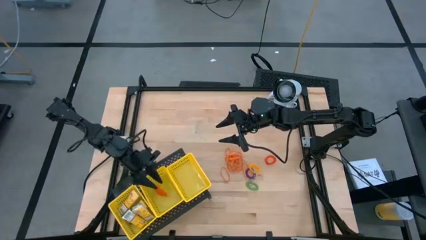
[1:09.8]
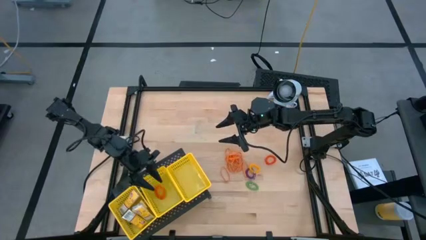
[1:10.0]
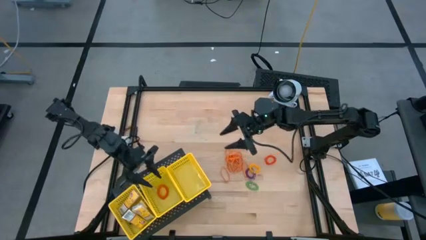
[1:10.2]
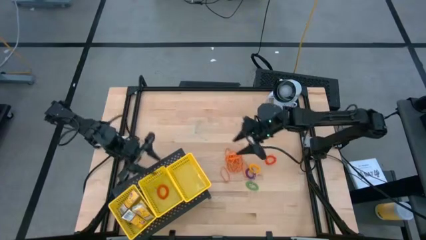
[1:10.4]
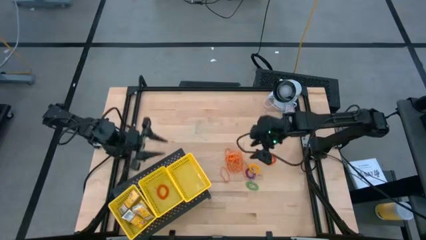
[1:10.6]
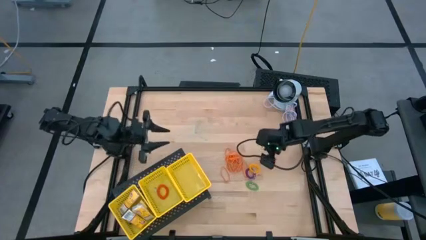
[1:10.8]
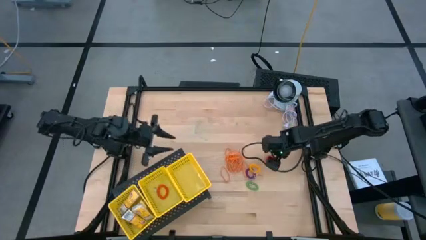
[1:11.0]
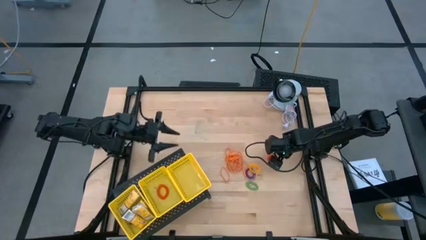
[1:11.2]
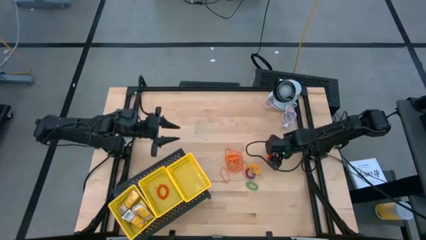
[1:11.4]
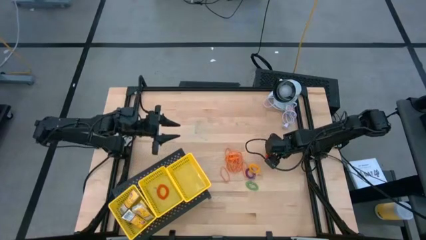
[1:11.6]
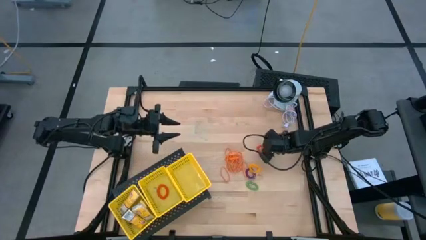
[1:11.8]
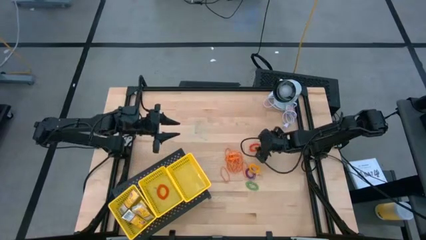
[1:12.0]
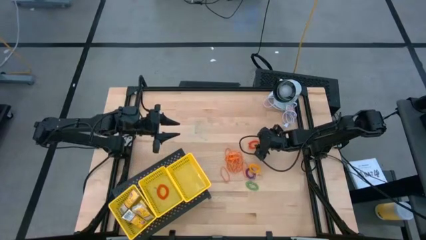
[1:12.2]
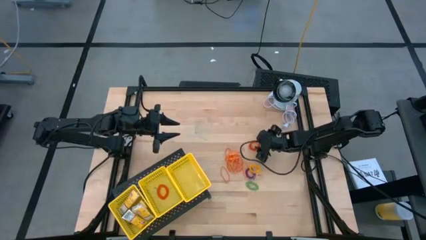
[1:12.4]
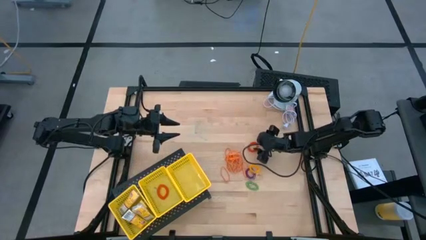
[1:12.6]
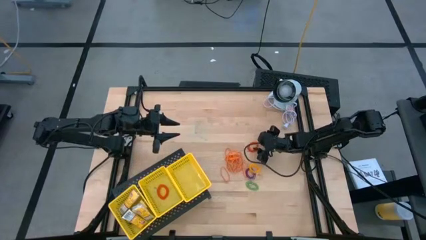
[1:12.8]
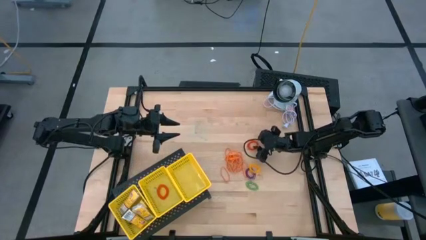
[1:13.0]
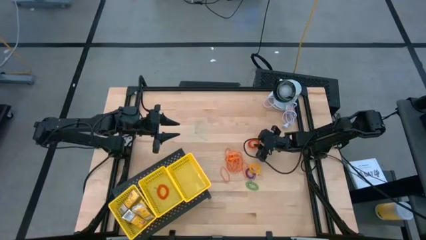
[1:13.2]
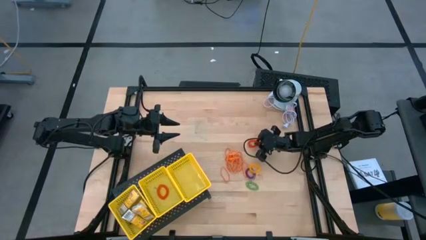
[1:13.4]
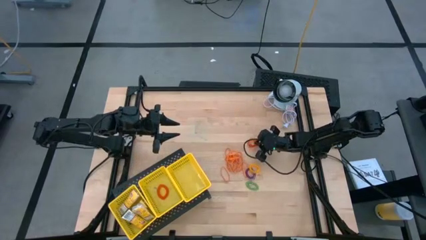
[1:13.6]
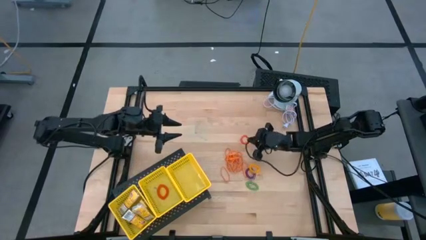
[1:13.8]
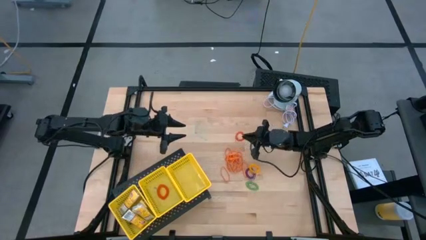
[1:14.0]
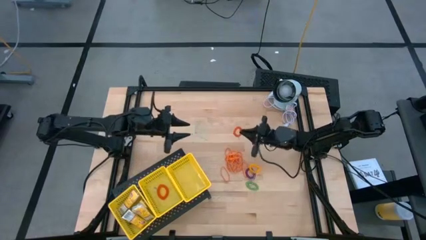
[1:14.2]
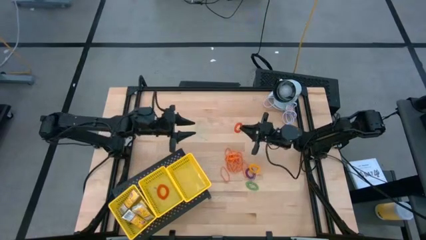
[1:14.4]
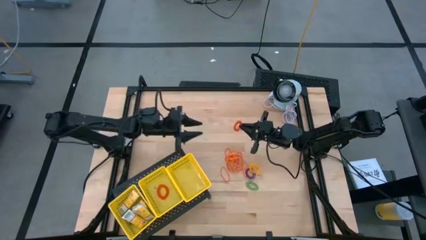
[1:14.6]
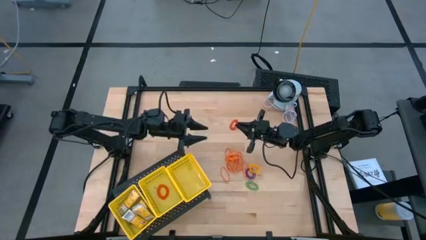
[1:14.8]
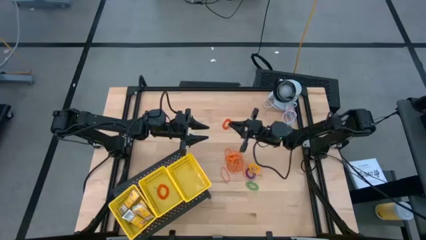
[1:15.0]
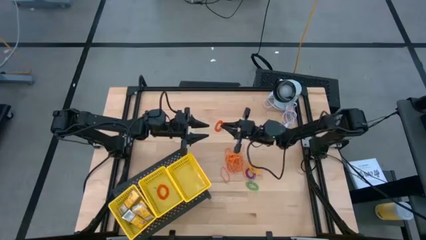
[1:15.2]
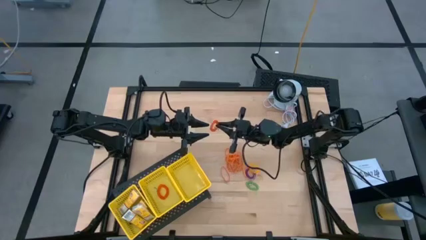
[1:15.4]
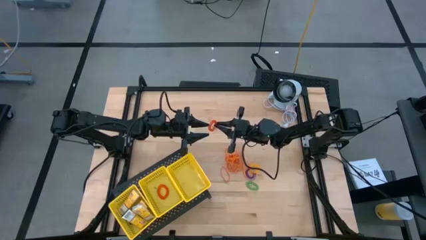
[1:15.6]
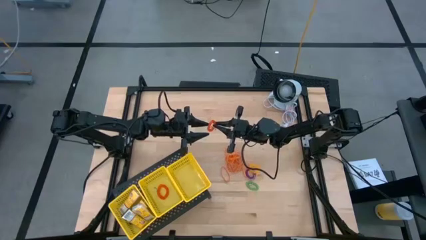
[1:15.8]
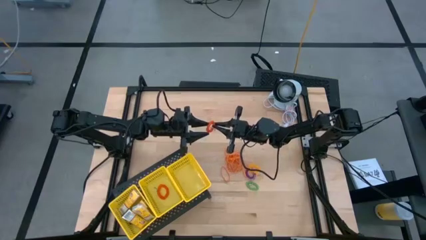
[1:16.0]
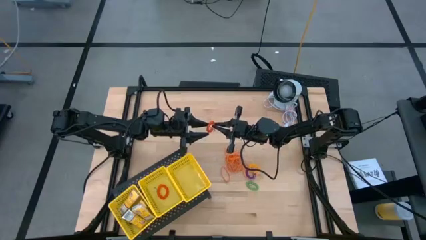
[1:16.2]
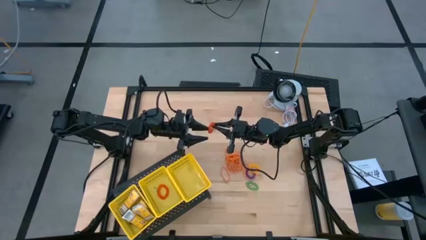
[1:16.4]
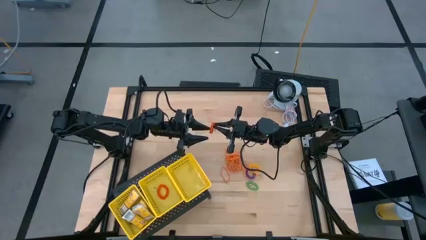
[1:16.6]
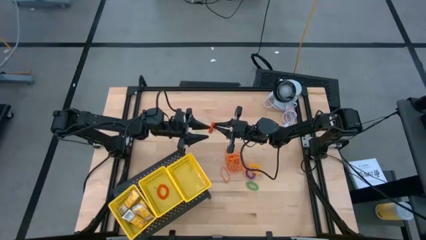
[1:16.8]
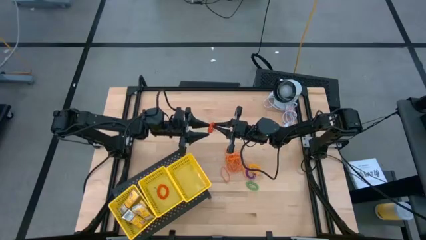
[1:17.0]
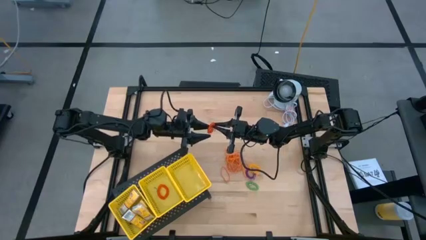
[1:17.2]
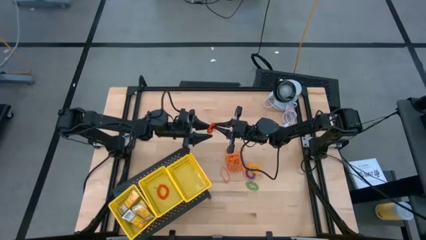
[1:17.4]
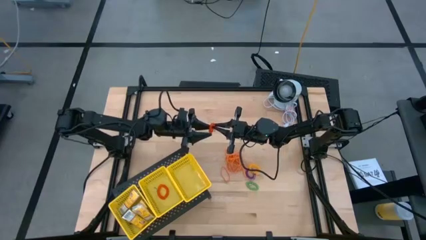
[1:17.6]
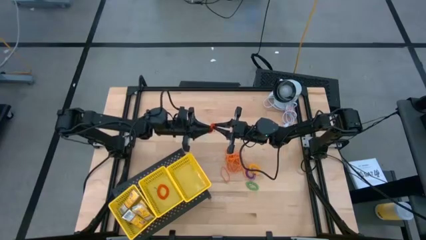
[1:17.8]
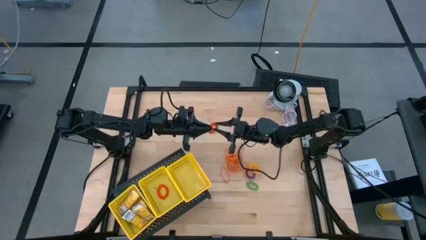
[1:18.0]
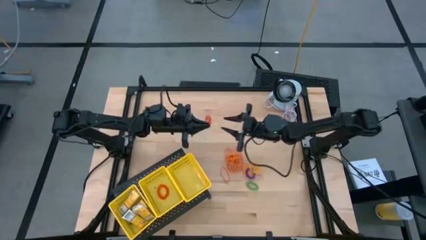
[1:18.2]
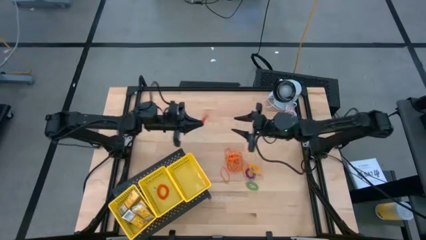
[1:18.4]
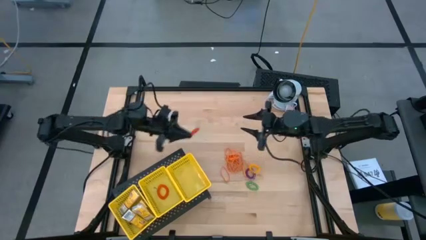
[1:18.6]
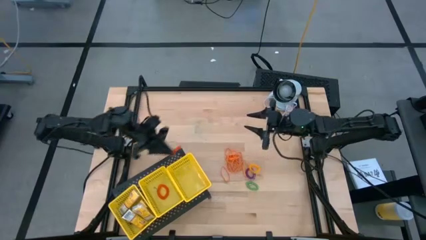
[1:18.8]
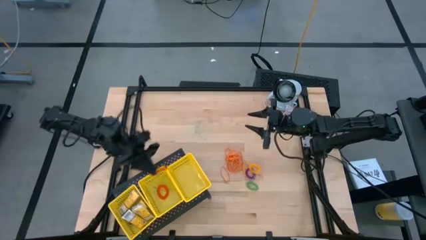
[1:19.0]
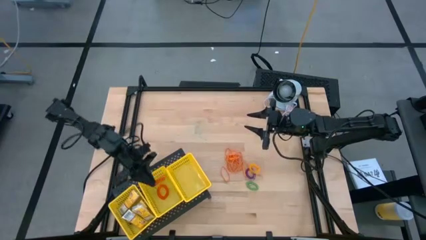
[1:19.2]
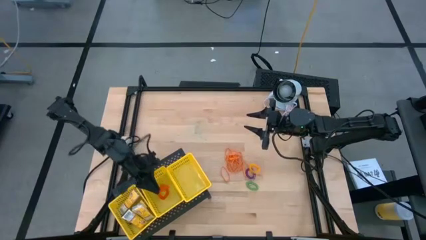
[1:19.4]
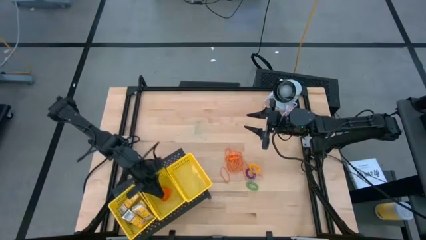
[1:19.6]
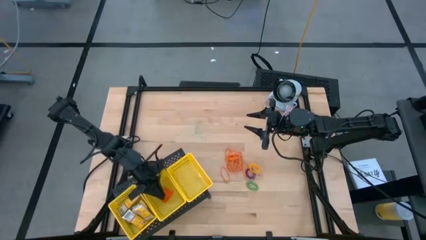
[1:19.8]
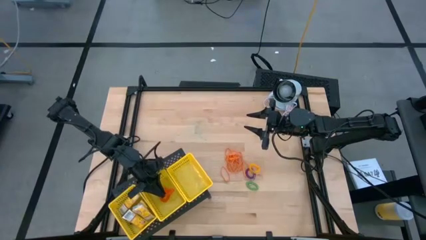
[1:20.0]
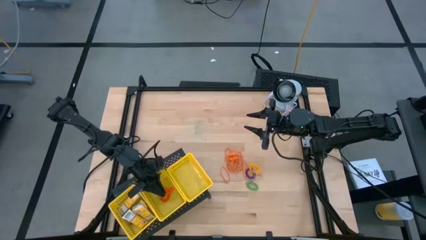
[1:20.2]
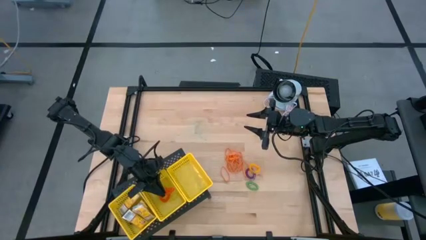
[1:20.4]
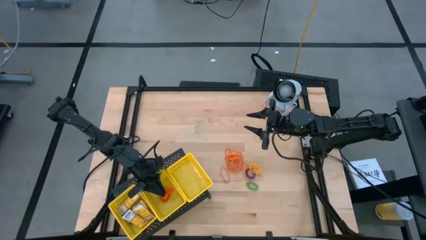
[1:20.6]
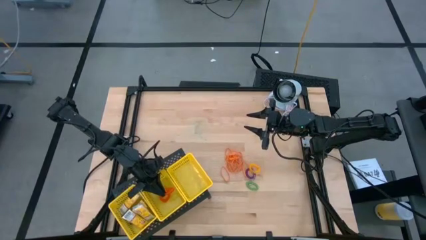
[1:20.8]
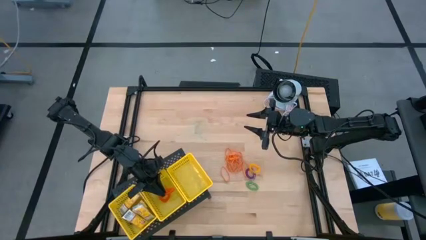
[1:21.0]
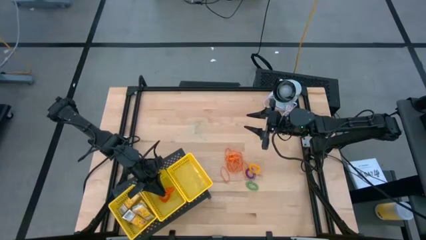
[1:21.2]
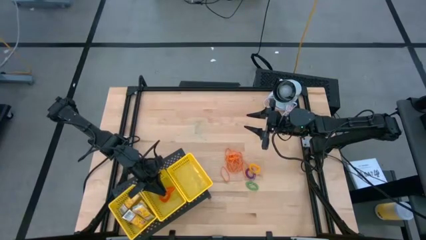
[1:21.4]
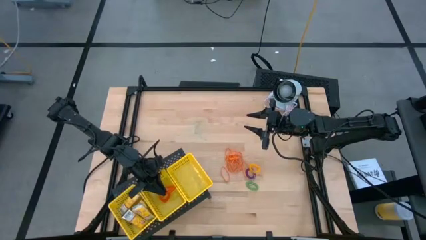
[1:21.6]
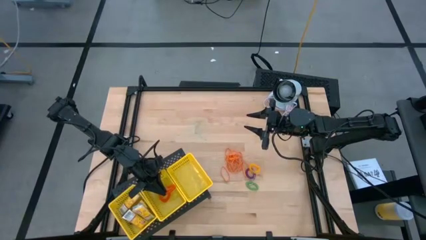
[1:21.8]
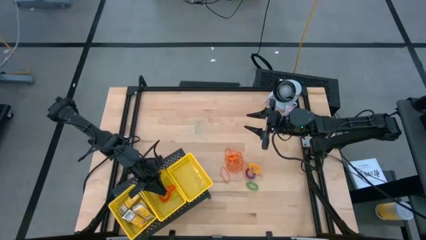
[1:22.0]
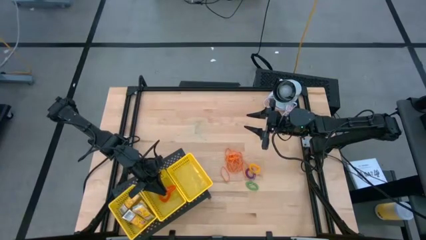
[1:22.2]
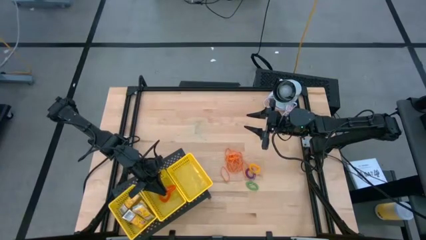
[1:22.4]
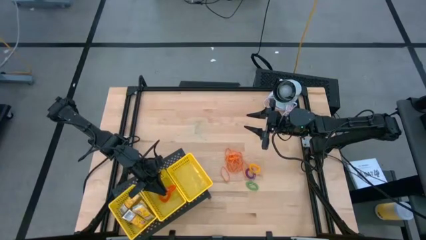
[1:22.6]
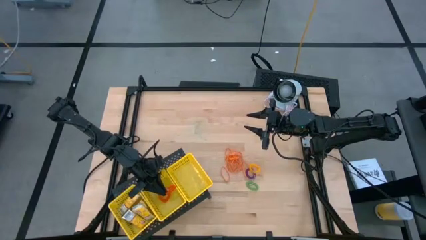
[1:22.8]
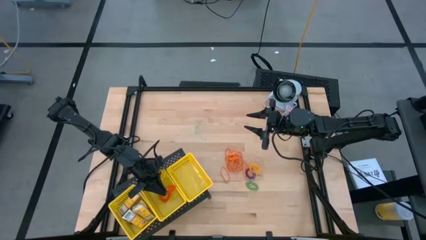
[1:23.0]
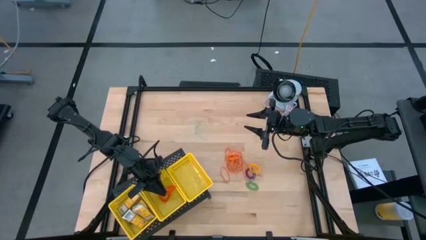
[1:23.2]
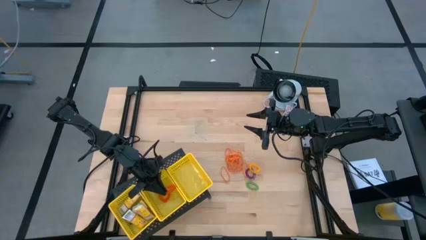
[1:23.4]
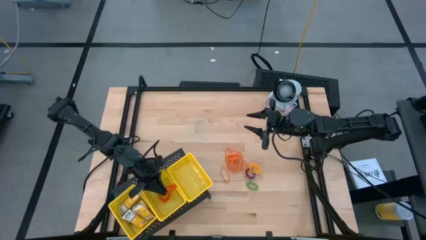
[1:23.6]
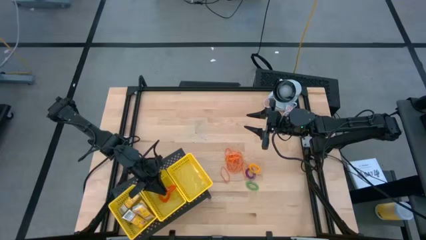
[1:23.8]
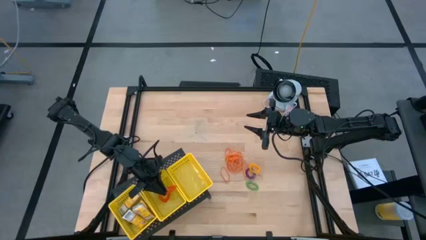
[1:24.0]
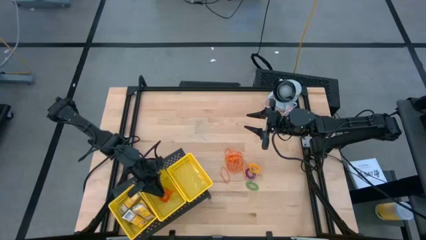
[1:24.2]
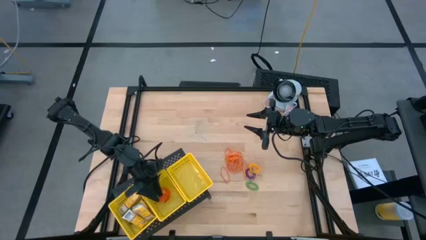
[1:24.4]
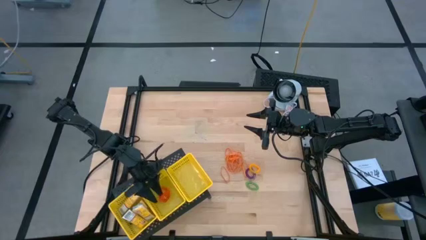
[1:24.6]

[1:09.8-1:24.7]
Task: Pick & Place Office Desk Supplies
Put the orange spring keychain into the center yellow bin on the shelf

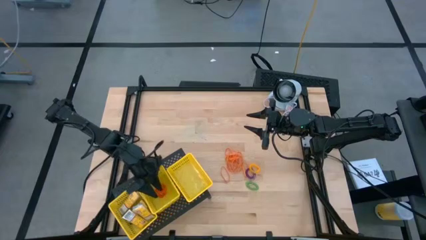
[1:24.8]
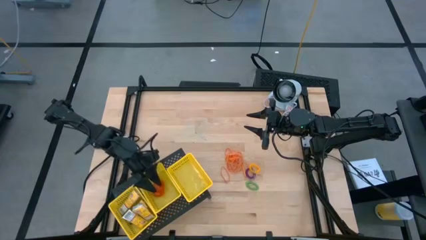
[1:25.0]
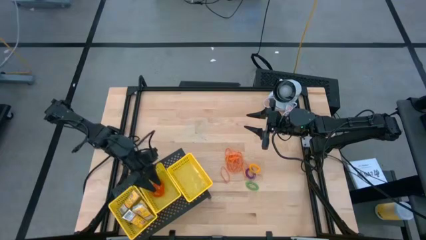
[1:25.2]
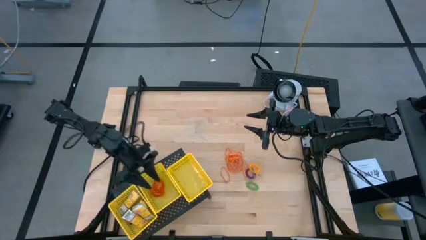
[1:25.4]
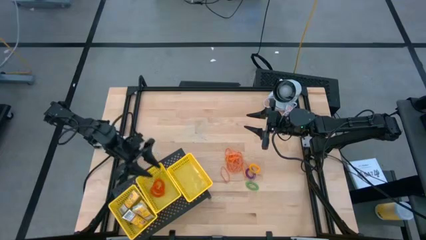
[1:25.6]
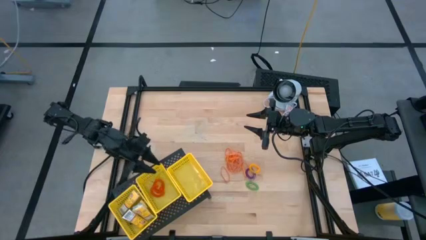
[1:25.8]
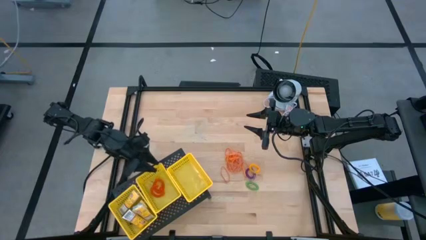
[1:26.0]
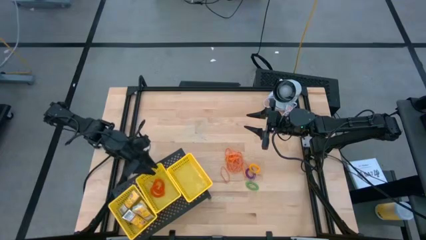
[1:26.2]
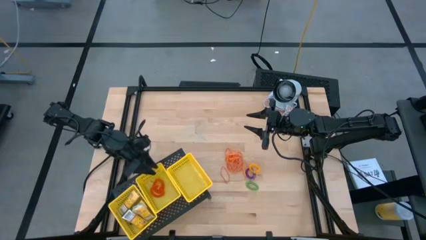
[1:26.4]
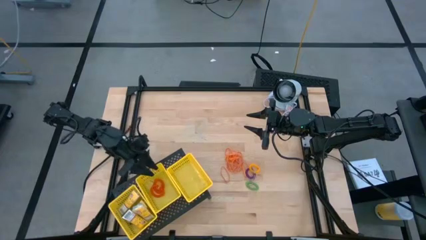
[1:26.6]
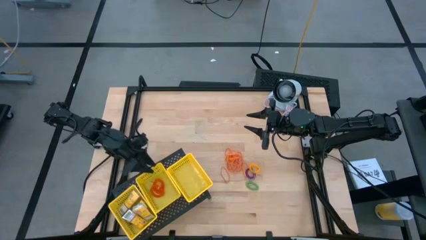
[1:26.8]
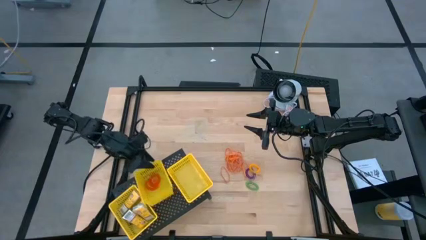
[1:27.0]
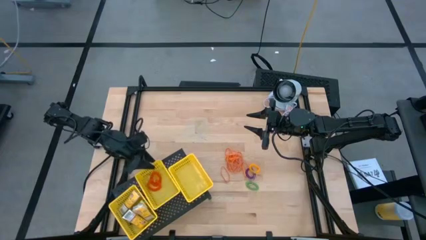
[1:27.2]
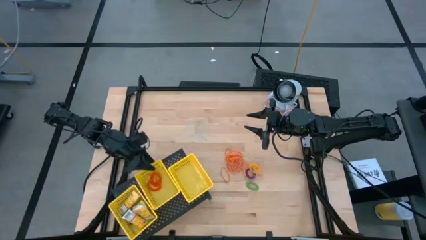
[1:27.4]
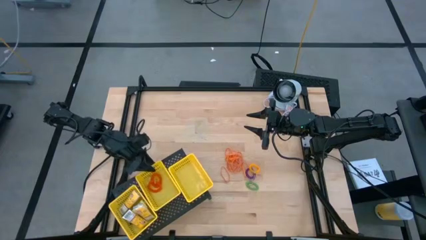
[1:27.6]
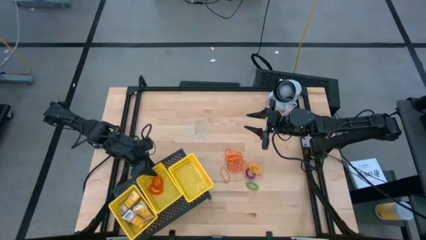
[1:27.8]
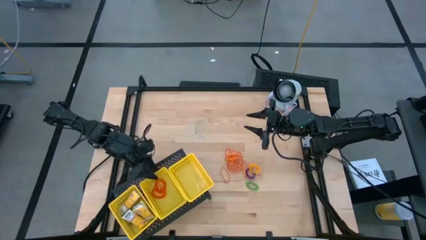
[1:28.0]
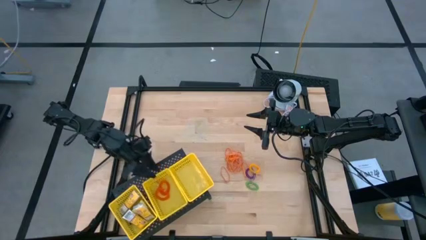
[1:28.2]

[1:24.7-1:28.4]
Adjust the center yellow bin on the shelf
